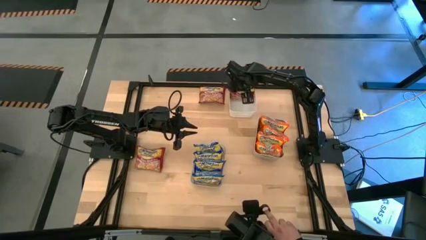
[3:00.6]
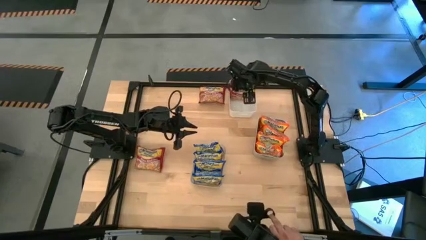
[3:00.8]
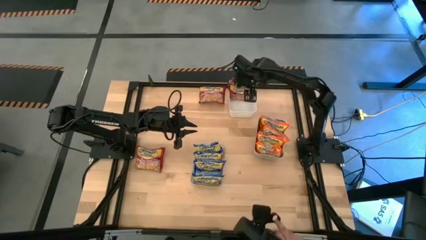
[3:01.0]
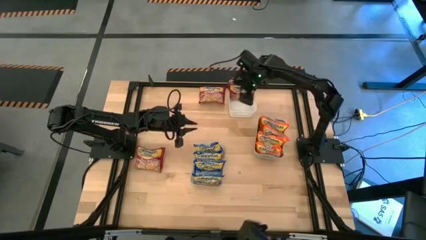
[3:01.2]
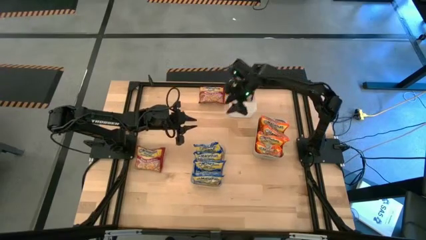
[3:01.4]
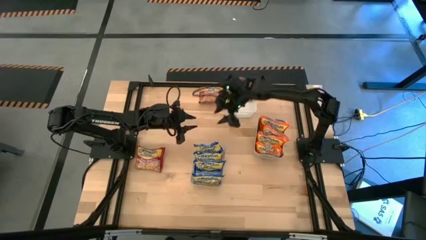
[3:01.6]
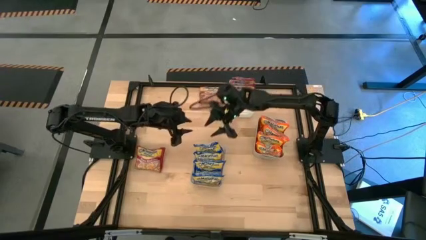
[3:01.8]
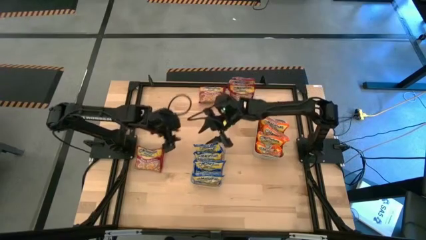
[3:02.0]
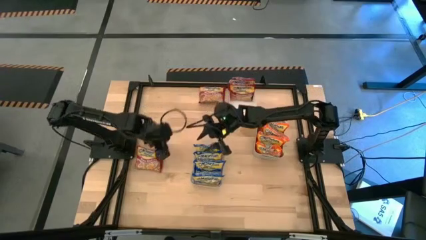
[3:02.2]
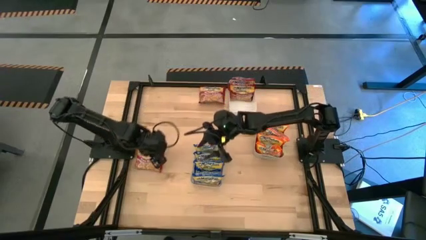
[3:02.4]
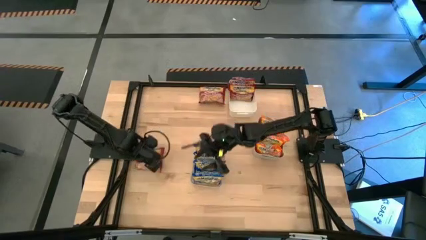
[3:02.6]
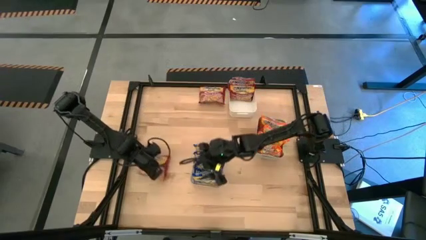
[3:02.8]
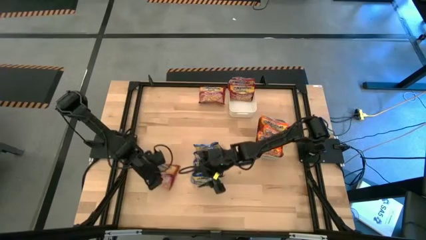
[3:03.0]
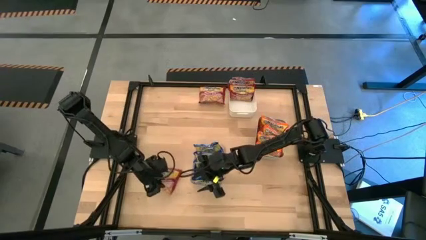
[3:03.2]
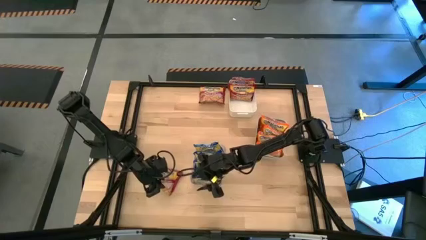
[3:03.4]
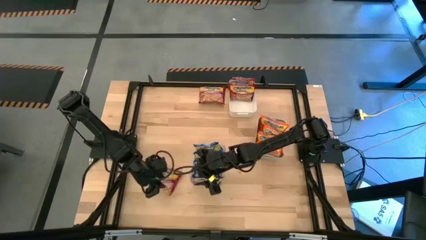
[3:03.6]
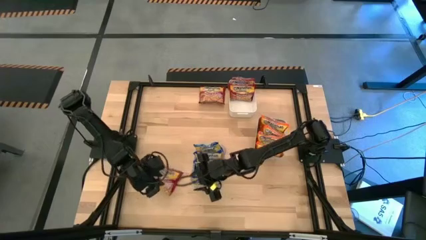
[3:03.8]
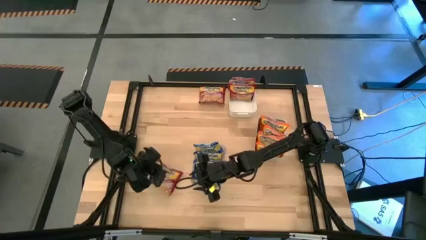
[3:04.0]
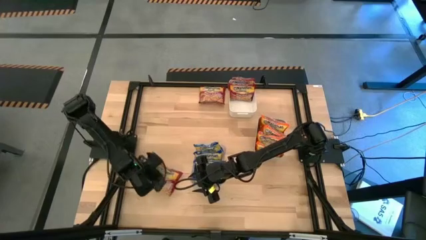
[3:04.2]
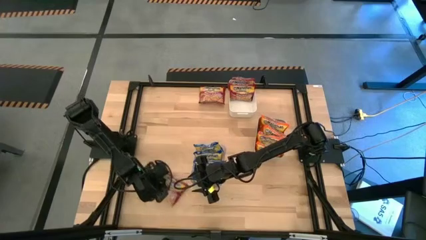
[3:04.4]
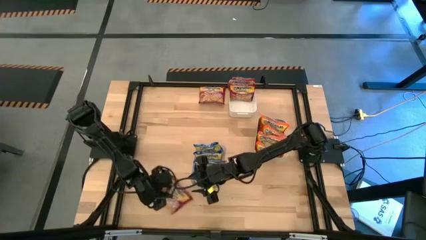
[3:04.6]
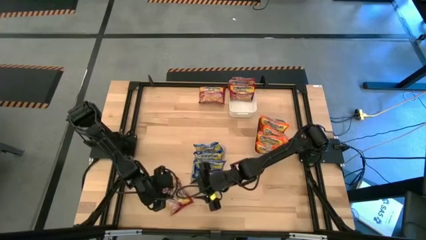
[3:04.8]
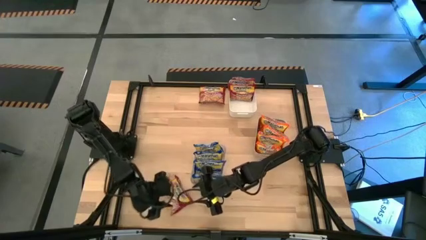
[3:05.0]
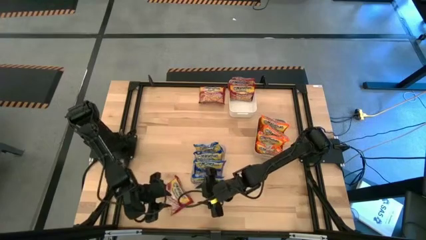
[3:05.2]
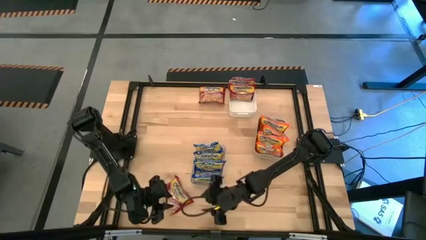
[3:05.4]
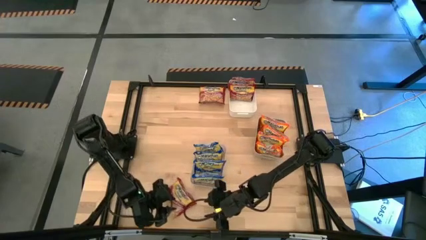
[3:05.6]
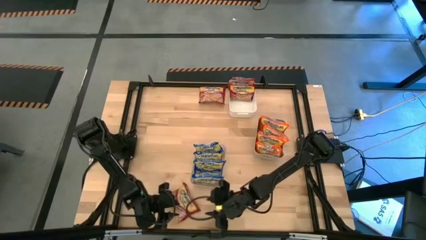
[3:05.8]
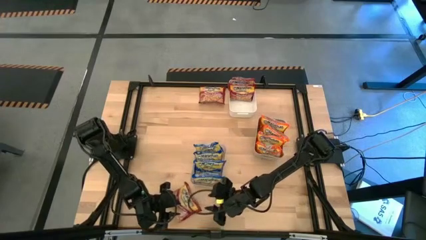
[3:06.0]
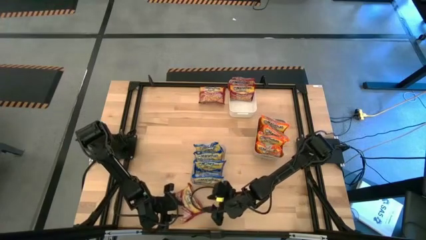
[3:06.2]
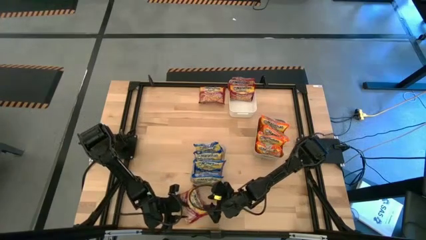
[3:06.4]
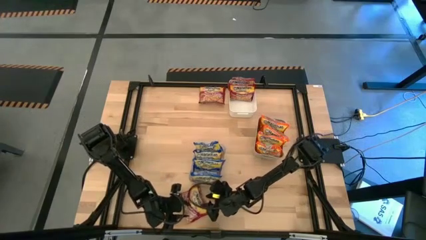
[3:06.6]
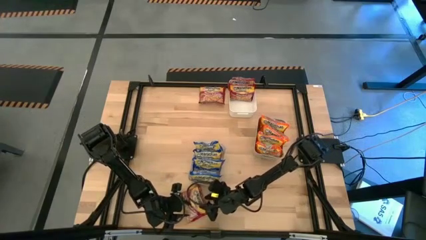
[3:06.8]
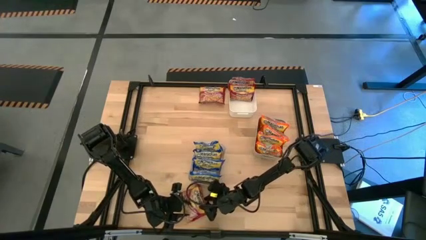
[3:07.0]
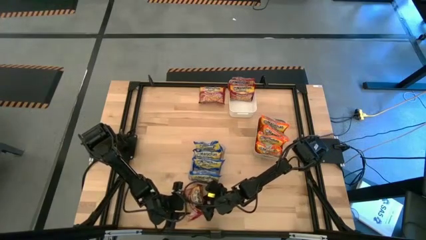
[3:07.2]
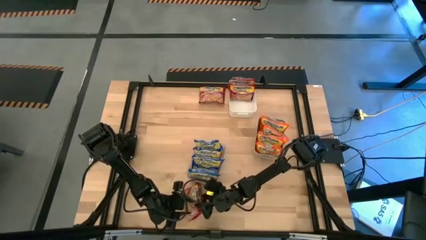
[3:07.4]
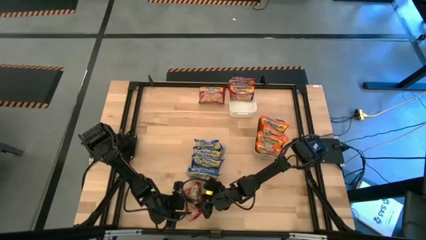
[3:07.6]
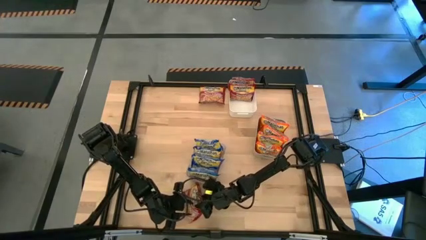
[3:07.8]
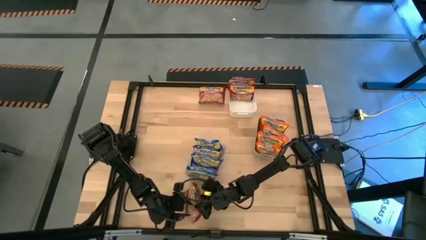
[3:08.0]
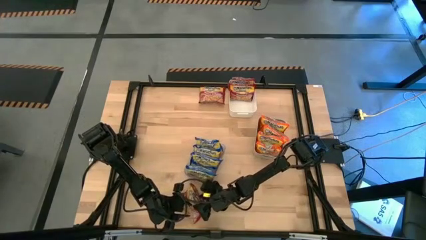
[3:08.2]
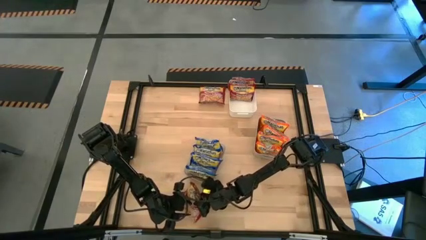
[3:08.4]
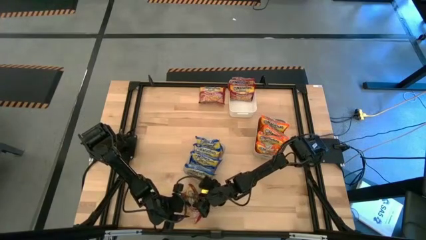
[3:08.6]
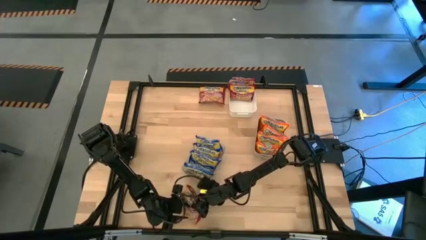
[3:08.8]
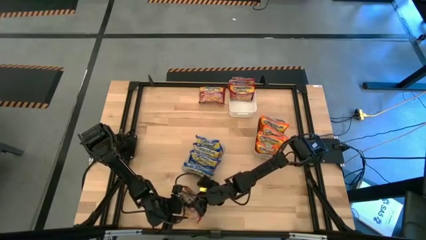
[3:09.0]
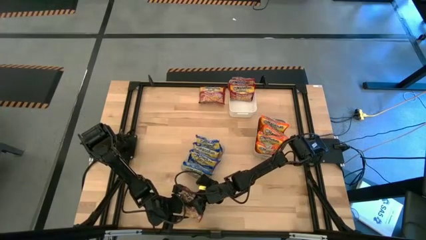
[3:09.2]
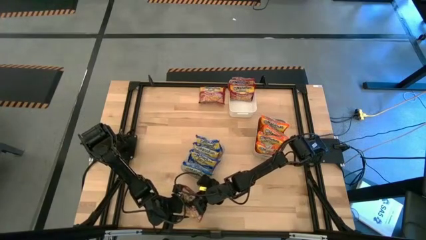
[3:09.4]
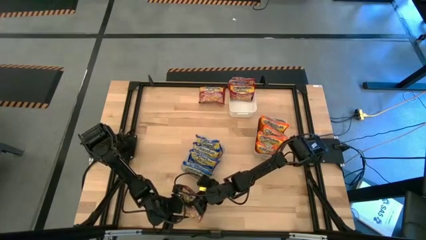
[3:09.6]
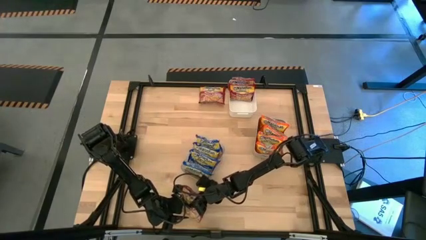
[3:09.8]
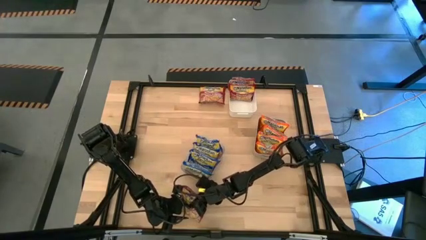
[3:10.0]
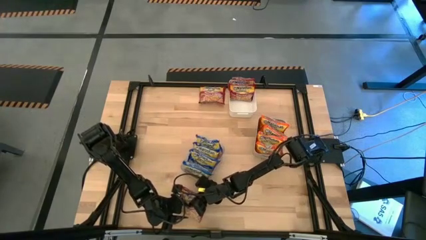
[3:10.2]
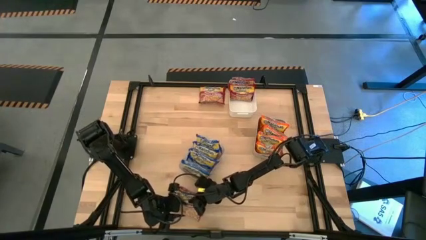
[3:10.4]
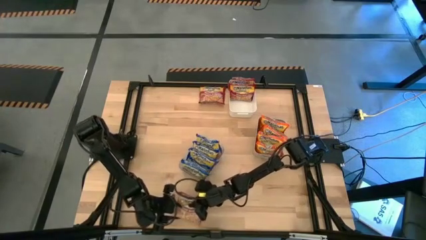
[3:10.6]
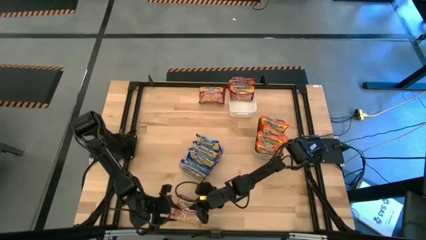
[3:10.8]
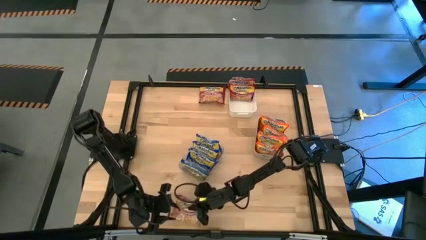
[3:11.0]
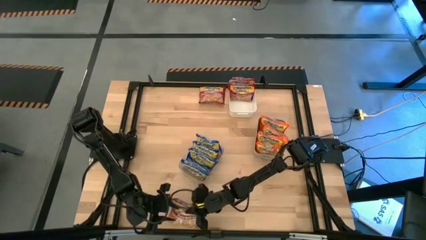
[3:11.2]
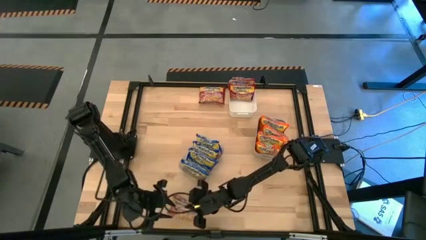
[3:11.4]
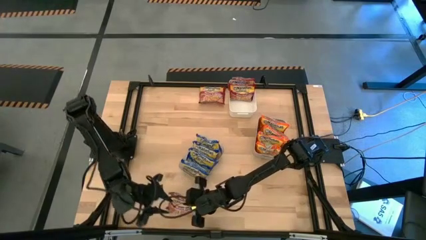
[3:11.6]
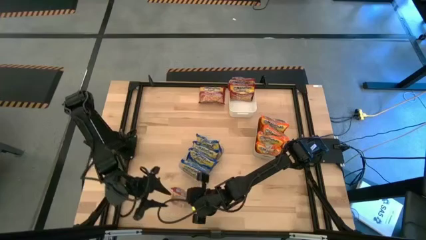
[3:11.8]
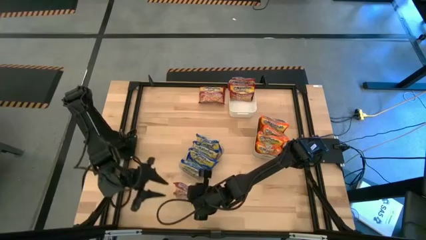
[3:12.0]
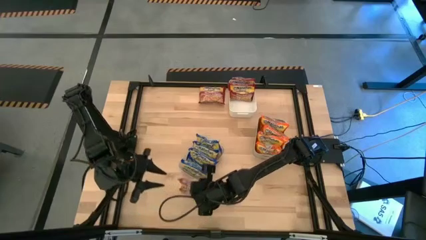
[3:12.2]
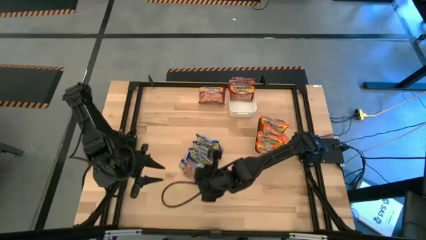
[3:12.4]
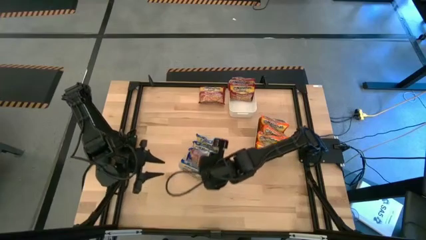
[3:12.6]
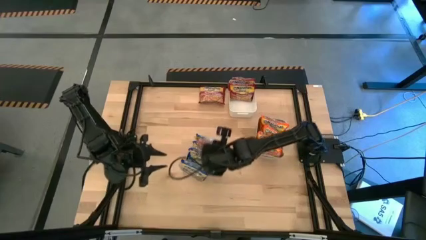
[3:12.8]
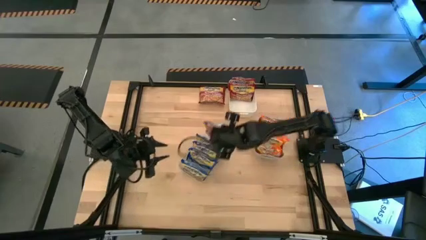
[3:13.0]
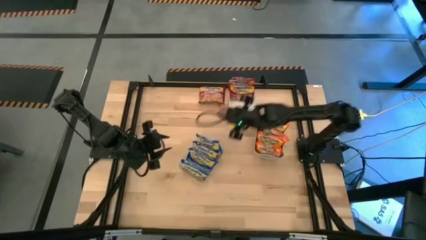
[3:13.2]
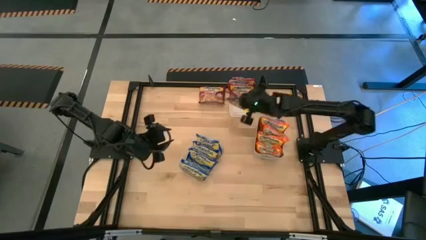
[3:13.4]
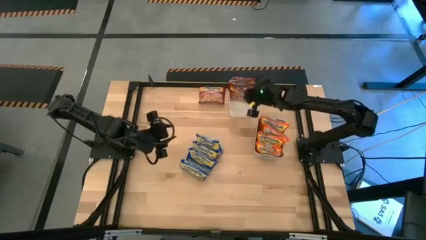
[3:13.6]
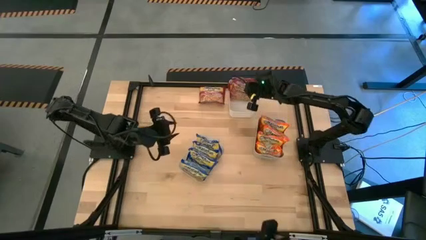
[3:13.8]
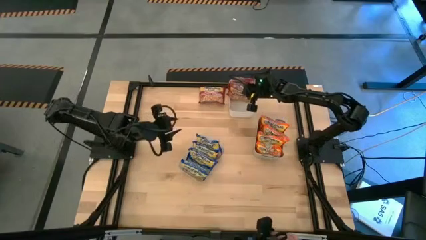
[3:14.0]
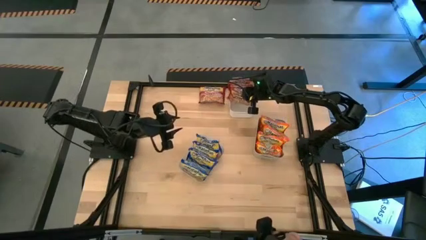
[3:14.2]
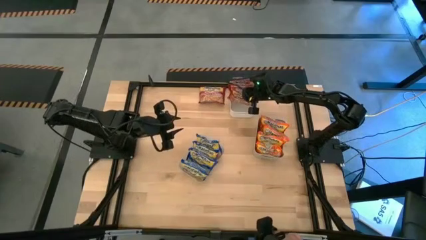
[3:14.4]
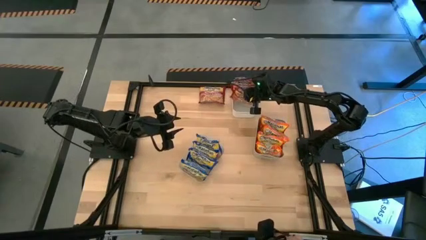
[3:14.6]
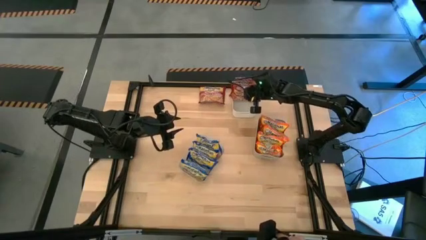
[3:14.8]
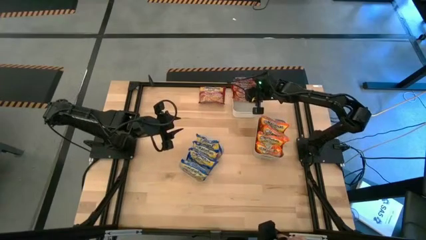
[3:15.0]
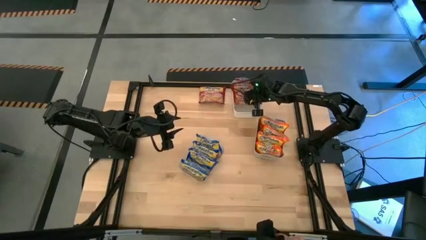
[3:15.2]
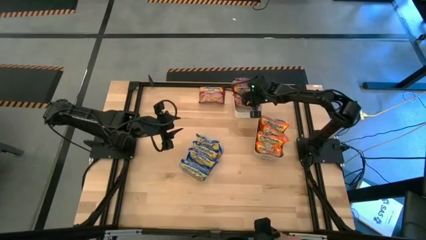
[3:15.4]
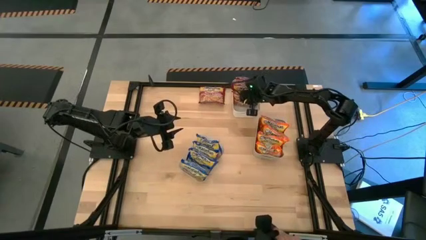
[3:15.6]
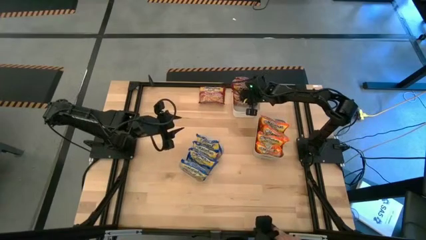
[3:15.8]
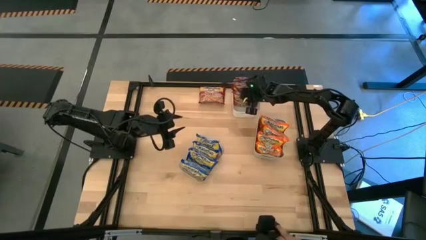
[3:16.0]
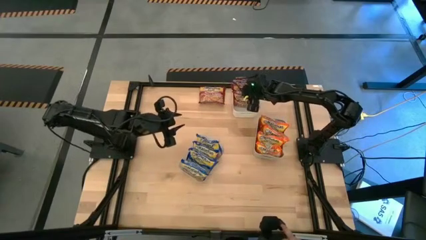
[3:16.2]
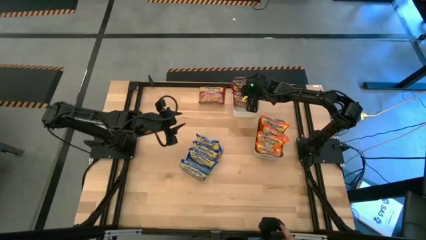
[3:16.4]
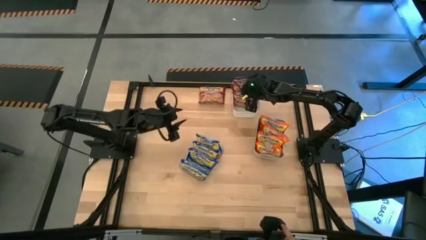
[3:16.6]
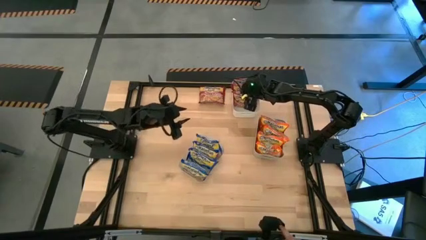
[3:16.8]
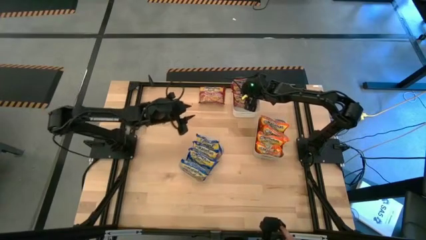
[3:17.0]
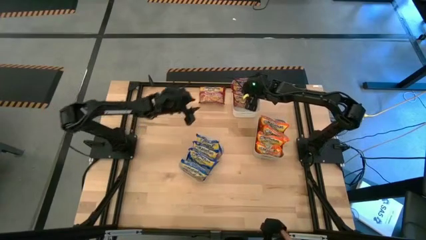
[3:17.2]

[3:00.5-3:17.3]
Task: Sort Maruchan noodles
Put the bottom red noodle pack into the white bin
